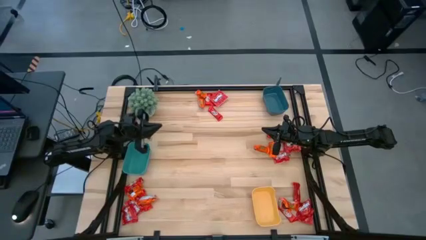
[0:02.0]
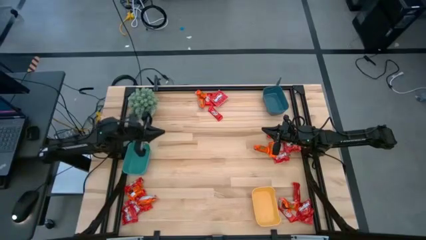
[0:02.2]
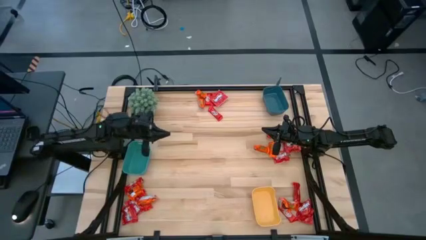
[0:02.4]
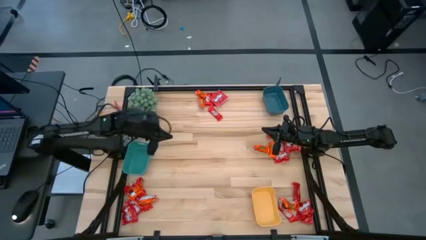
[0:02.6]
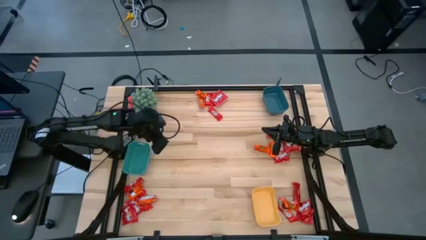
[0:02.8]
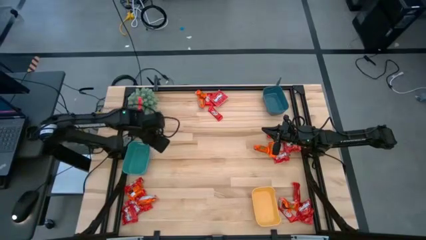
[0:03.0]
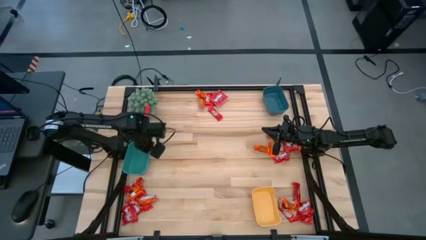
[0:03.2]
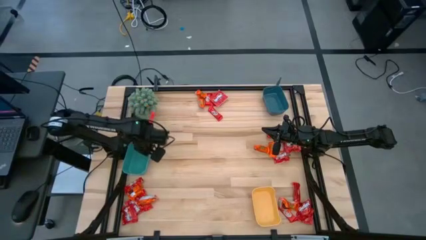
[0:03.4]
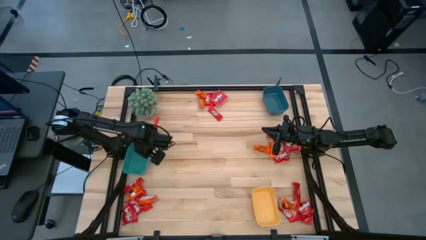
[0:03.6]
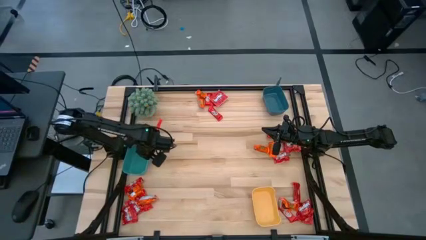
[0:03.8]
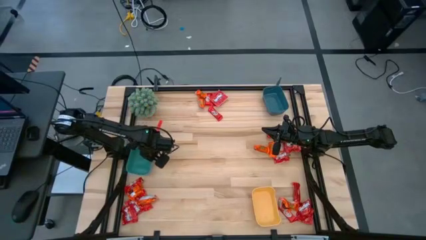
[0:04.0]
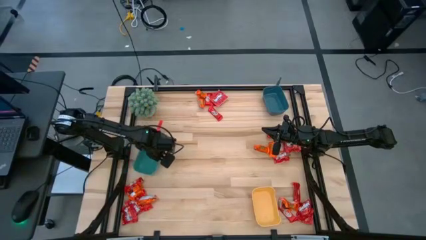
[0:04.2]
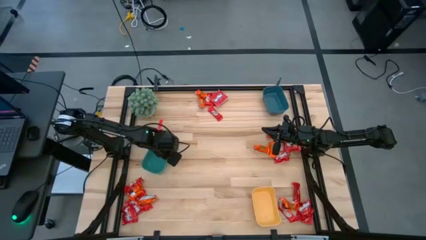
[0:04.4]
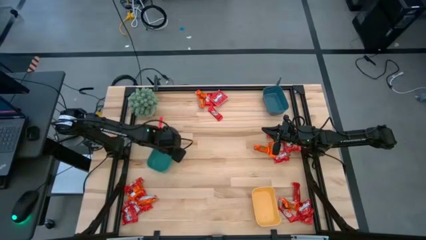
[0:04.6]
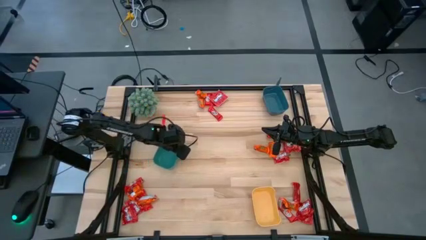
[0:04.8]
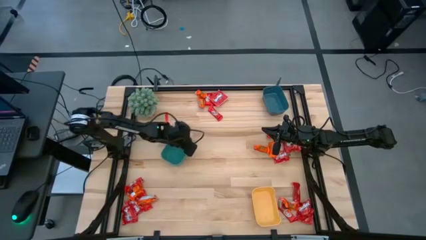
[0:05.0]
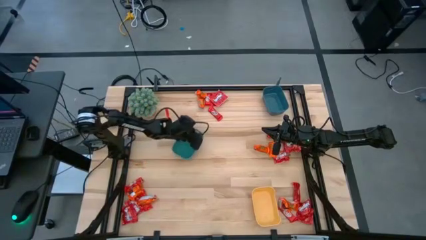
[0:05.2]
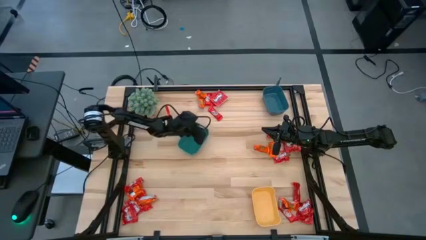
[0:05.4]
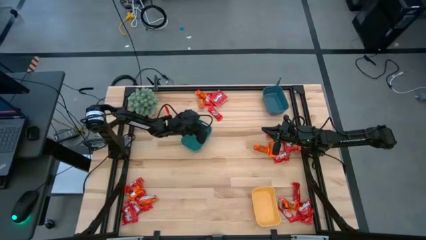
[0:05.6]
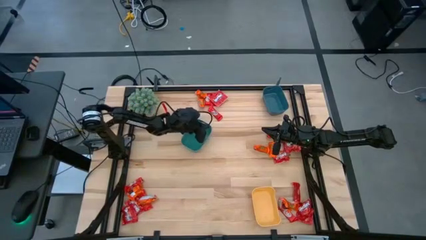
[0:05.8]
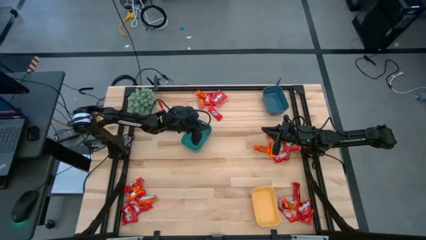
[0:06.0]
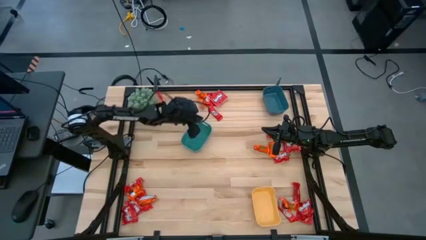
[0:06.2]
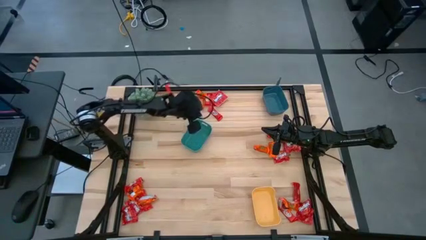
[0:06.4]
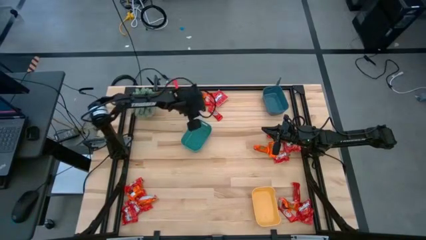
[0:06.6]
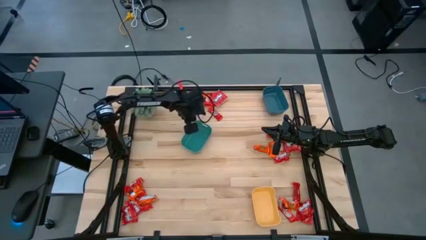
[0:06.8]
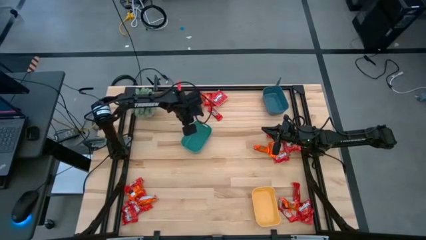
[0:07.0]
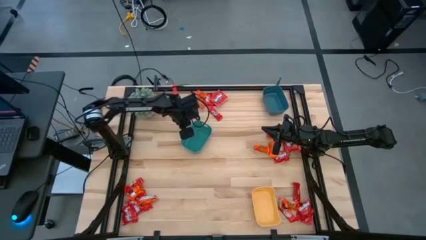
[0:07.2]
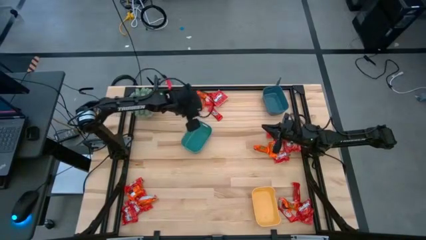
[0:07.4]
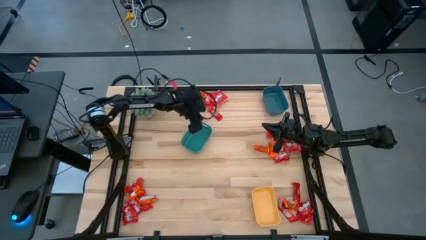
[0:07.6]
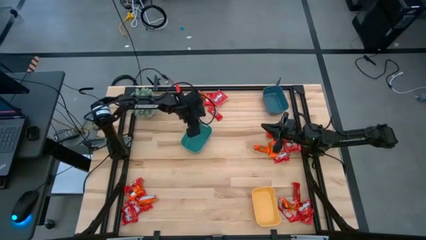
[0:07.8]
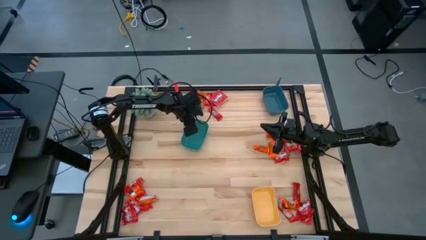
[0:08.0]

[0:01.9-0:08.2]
Task: Sort candy
Move the green bin from the middle left to the center

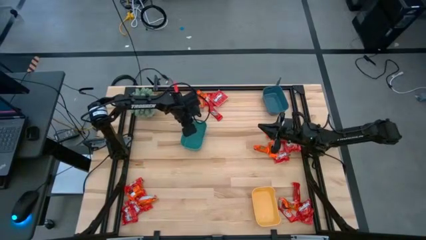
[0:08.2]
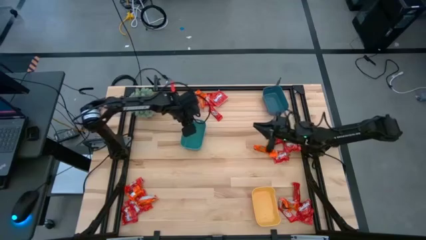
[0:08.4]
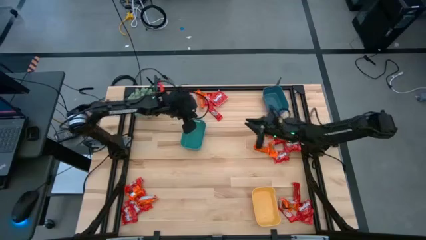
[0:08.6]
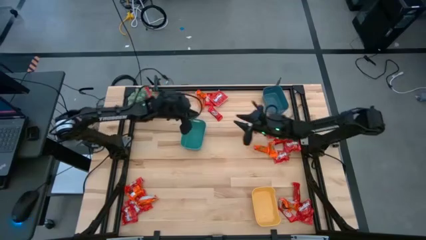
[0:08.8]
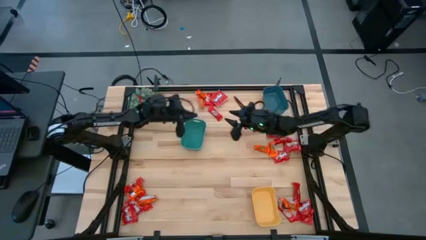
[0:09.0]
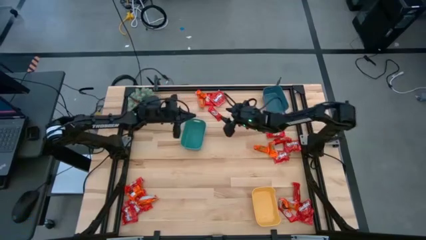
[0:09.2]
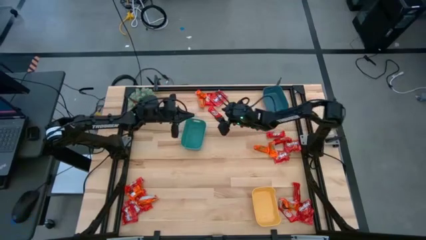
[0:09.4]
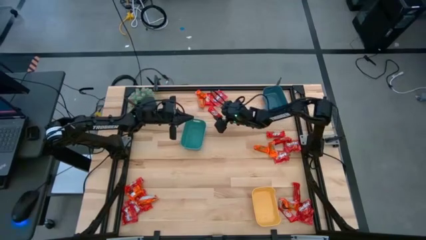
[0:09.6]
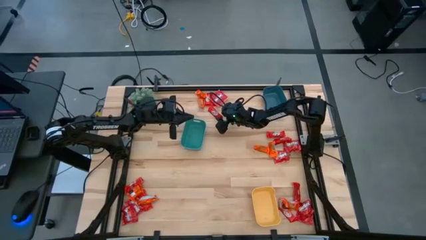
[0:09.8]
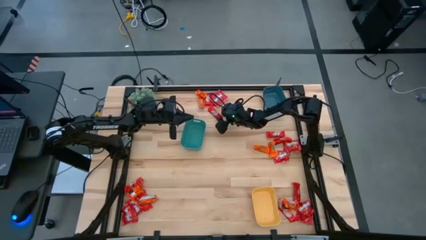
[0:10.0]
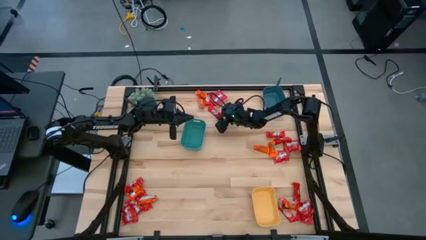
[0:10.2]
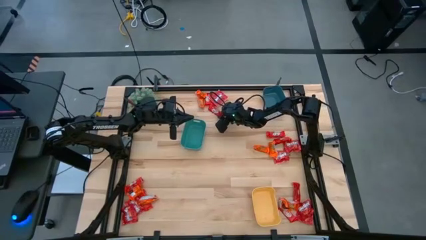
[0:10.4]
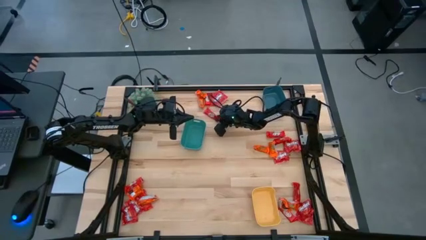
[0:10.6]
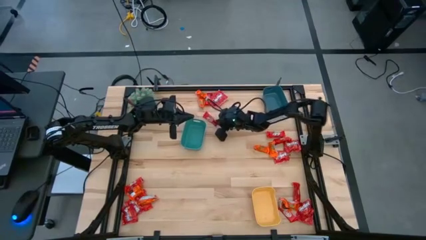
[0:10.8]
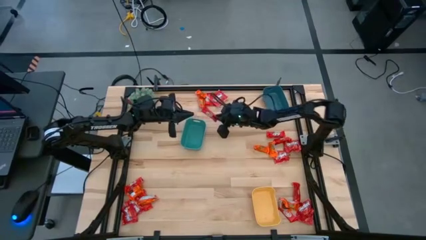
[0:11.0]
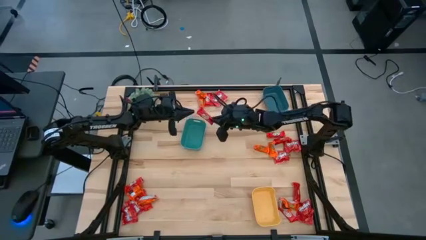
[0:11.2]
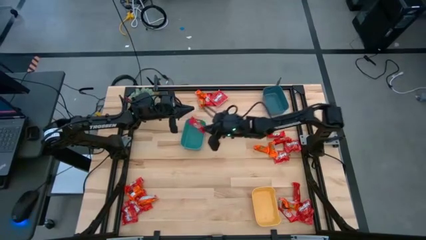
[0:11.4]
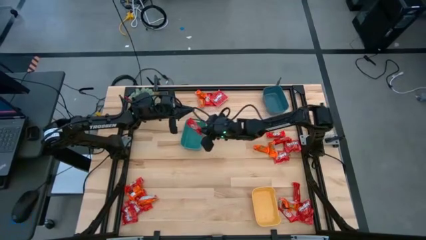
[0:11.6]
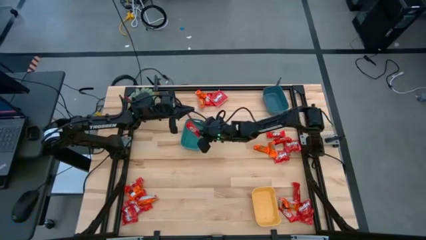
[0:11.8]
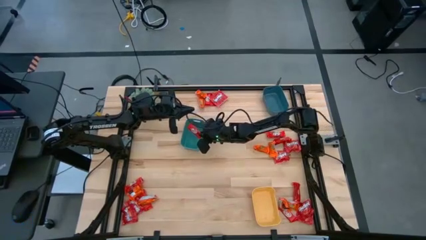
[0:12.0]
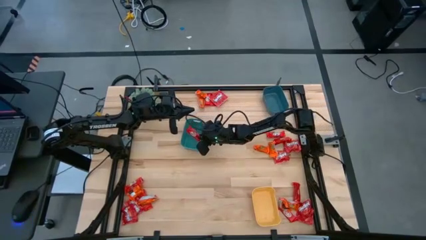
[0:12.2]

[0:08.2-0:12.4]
Put the small red candy into the green bin

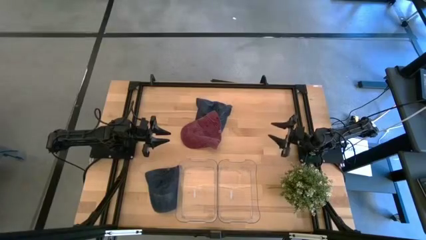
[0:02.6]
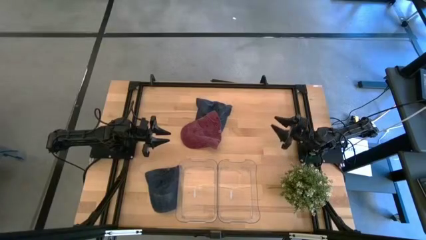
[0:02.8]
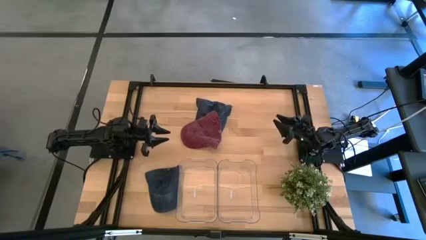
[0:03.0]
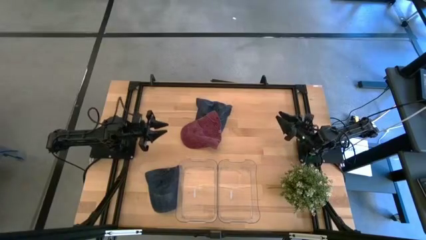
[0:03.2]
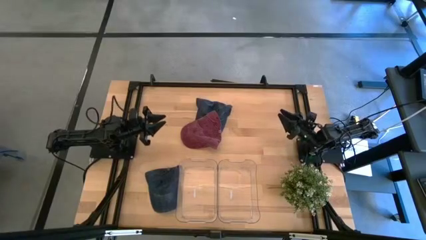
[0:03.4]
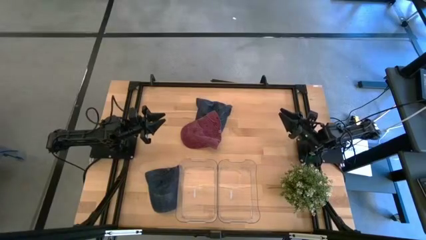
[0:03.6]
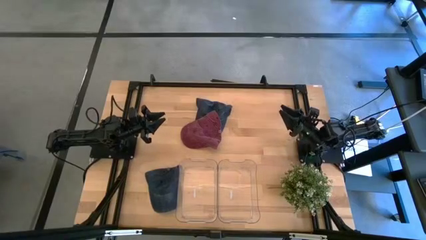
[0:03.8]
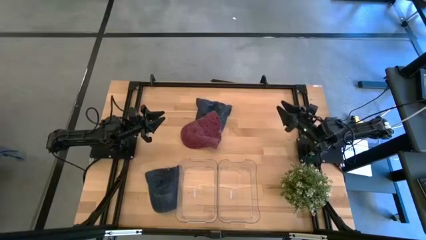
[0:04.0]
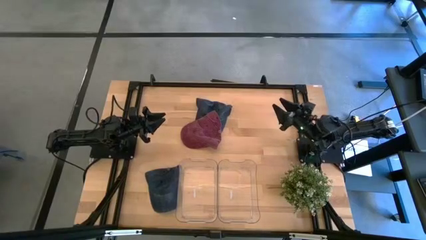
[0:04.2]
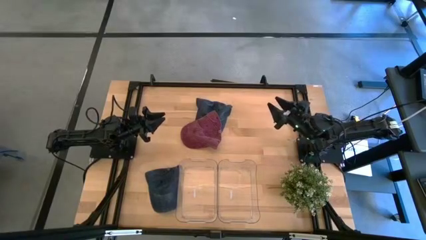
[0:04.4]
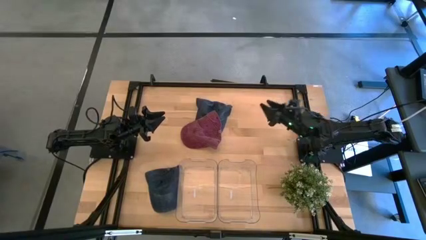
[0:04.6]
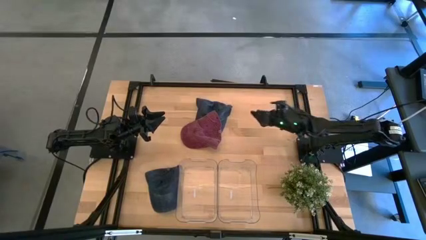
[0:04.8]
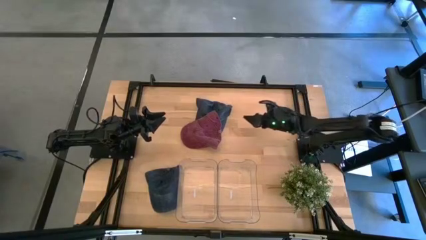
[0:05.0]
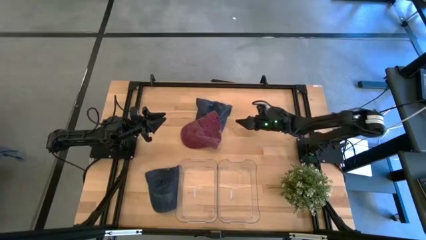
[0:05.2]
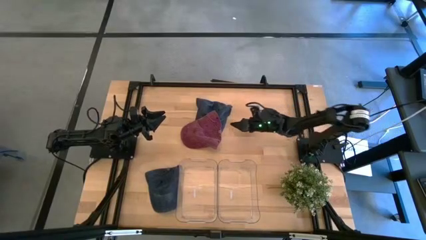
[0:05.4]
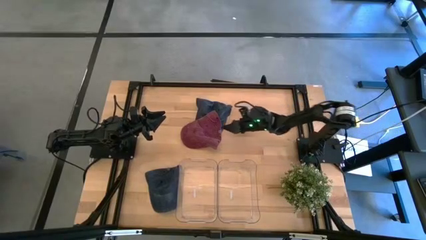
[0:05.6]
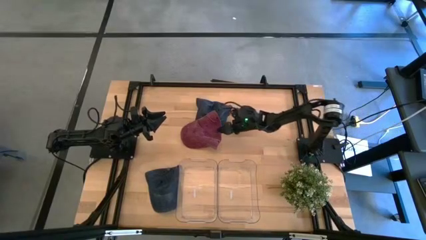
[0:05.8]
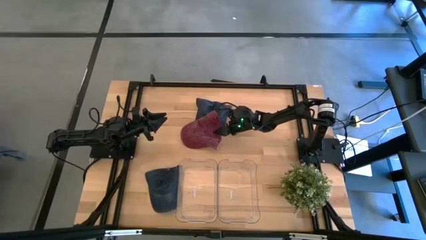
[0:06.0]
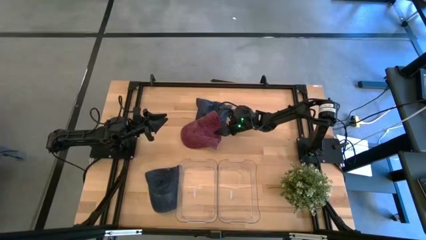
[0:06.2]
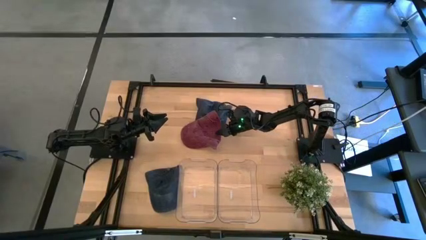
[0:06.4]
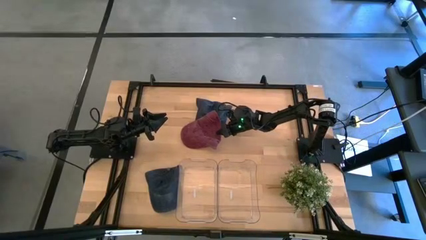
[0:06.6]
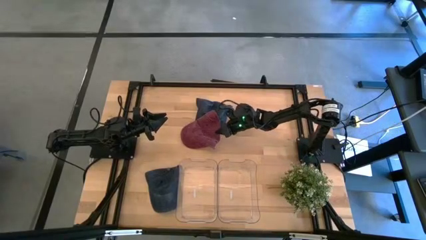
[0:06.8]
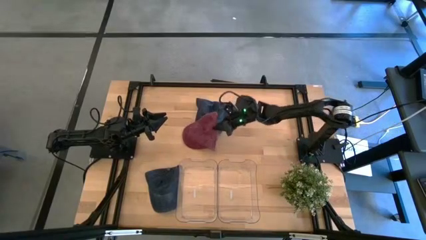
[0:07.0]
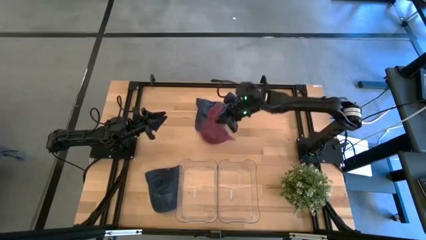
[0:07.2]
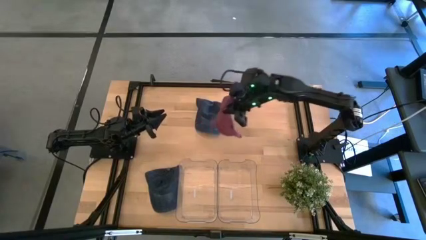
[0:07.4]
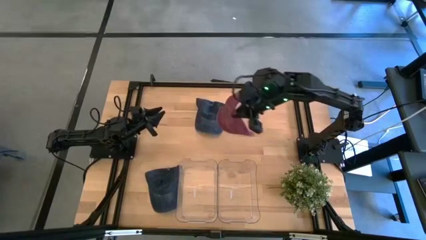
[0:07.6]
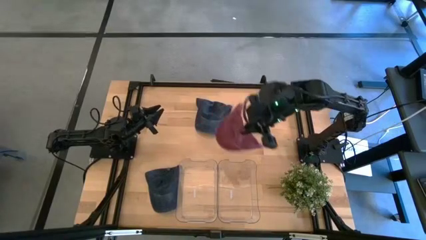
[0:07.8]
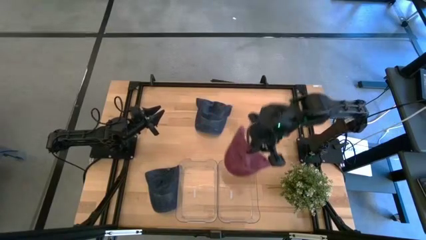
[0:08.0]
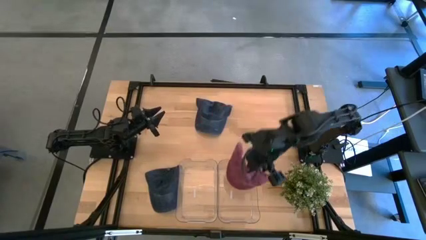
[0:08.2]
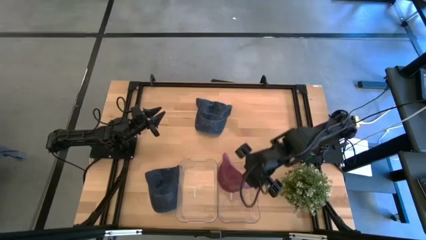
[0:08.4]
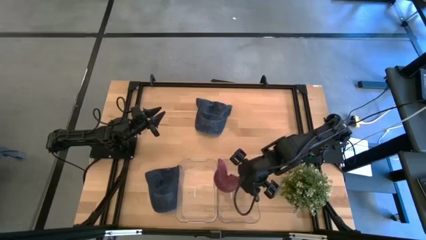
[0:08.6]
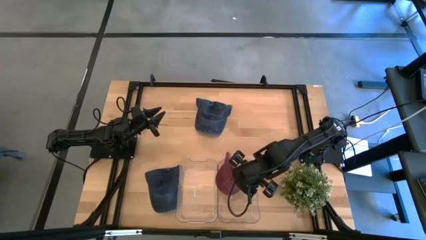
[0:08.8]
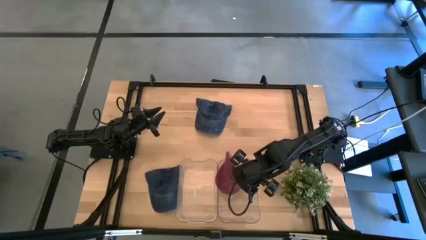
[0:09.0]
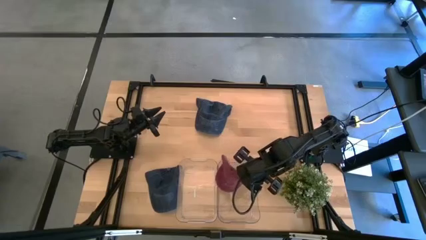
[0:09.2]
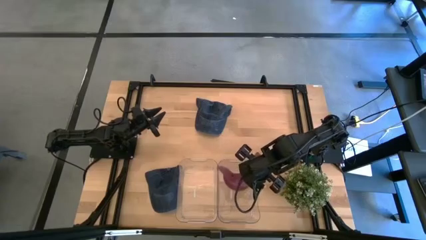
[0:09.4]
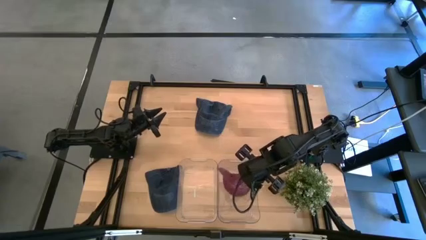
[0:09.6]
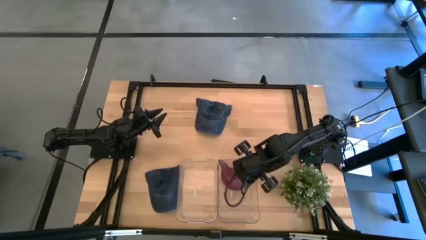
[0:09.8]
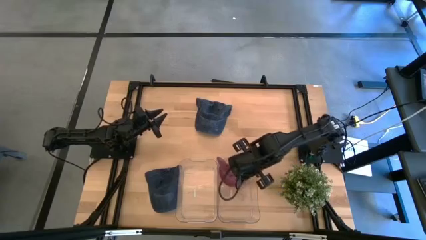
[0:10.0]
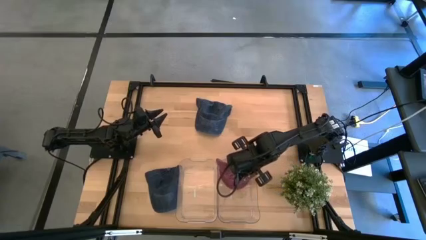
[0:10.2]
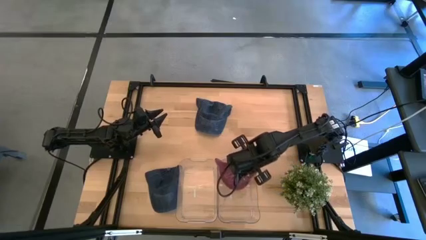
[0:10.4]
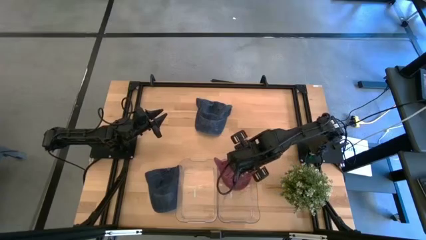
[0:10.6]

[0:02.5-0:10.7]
Task: Pick & Place hat
Put the red cap into the right transparent bin
